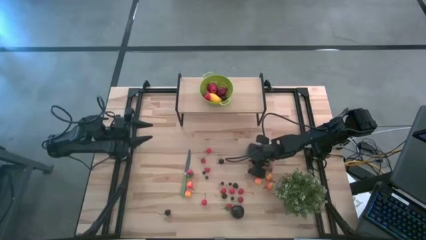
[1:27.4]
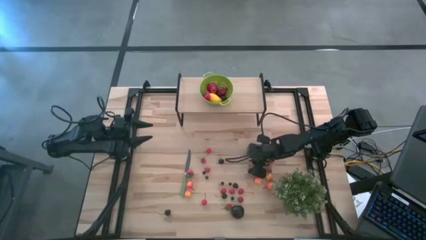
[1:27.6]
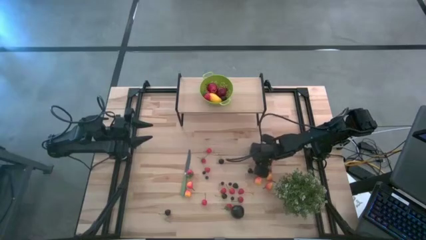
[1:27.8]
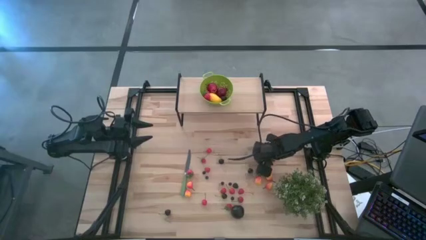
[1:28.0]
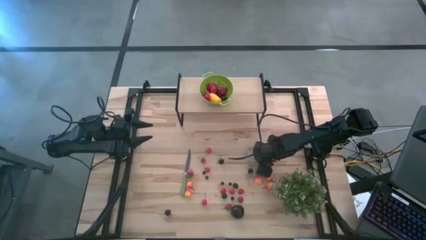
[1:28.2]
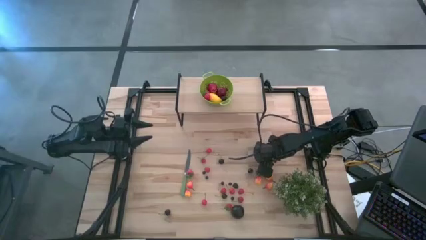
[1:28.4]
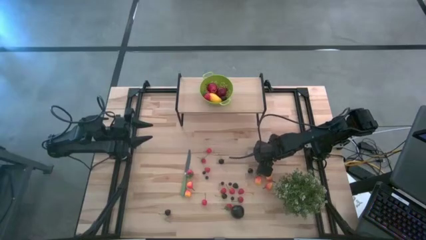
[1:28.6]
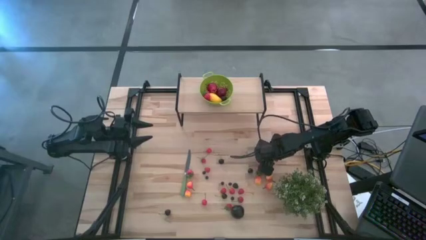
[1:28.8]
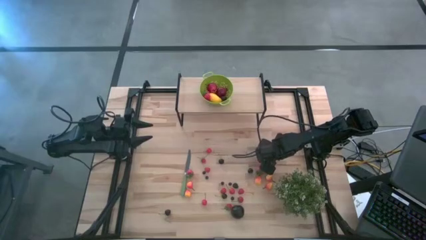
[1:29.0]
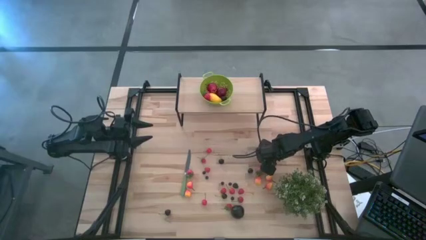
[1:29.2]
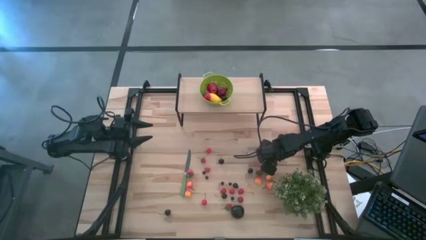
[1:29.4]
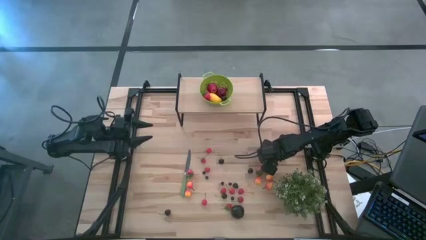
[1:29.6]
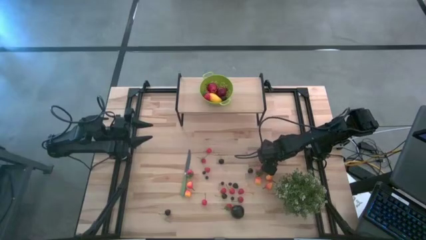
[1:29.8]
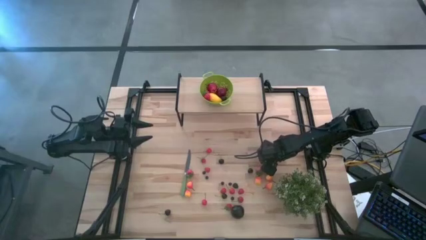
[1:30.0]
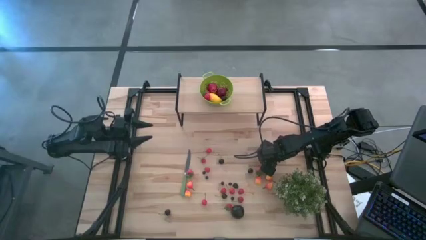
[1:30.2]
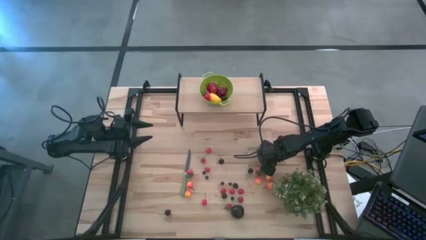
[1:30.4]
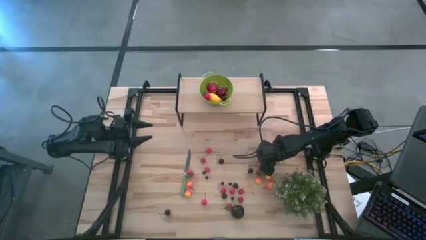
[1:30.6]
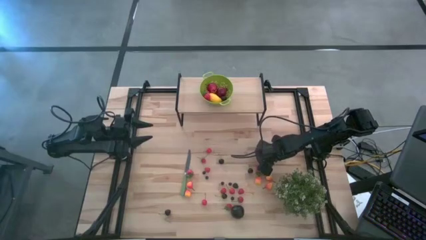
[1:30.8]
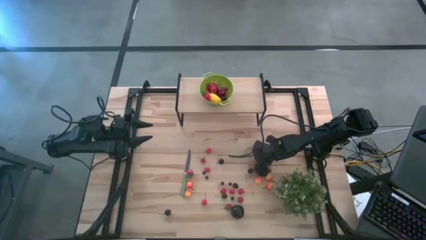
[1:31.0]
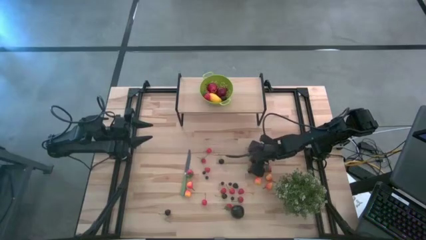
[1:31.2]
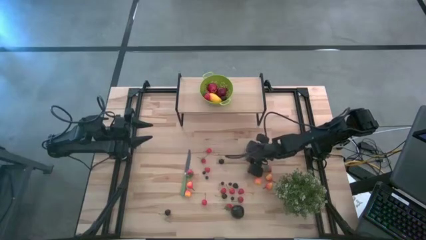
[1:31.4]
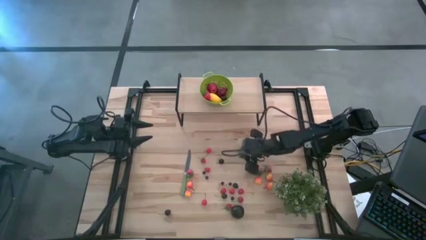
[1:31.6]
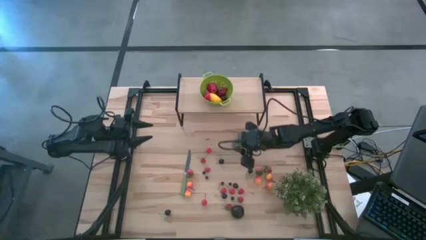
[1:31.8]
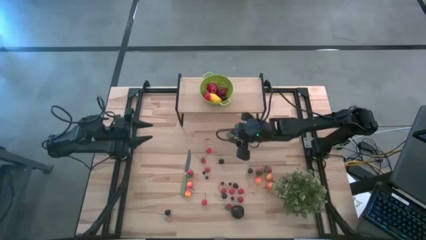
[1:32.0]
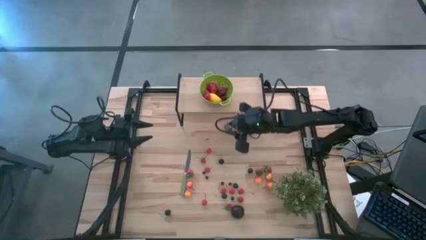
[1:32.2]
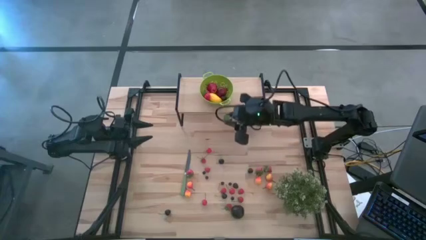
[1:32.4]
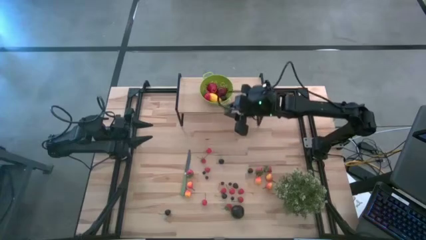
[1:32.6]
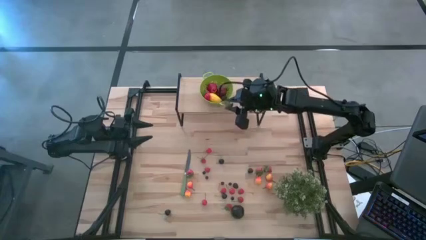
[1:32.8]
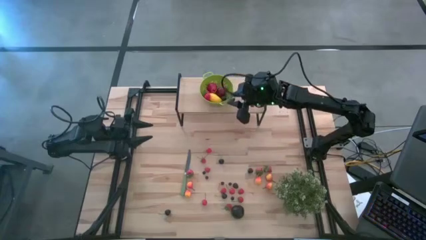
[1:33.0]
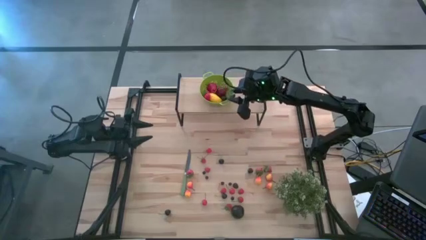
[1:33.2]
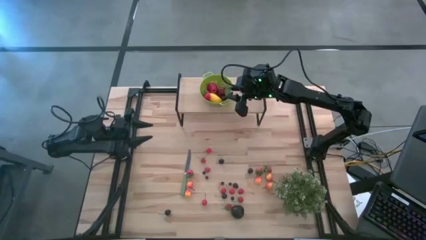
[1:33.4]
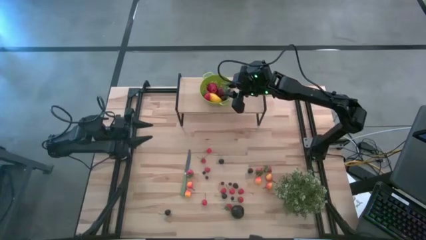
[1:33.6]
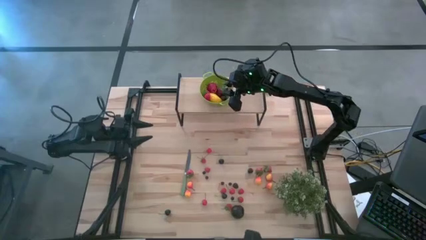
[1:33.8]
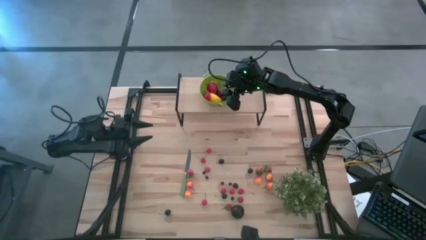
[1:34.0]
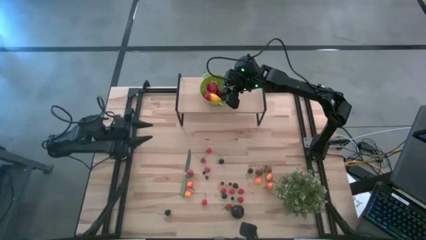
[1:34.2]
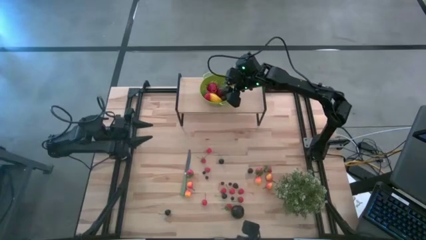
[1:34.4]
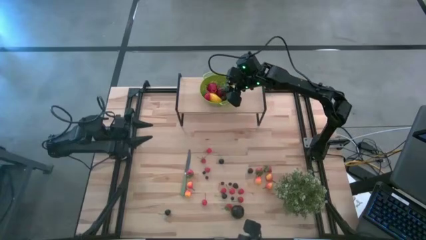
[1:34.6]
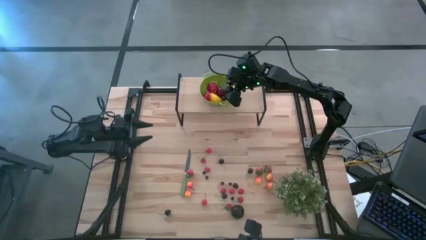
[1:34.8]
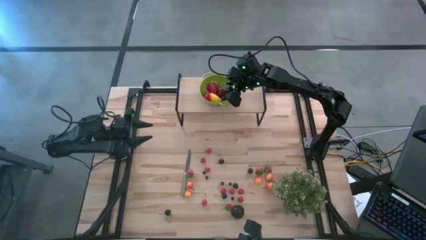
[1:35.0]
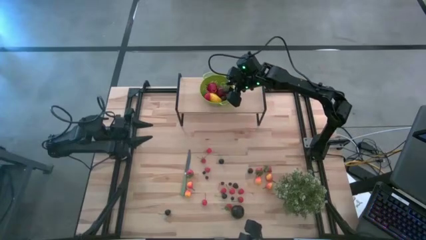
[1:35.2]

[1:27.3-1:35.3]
Task: Pick & Place Fruit
Put the strawberry into the green colander on the shelf

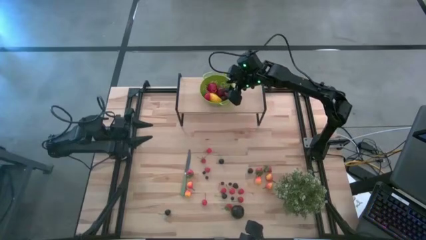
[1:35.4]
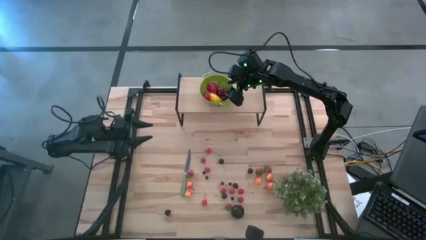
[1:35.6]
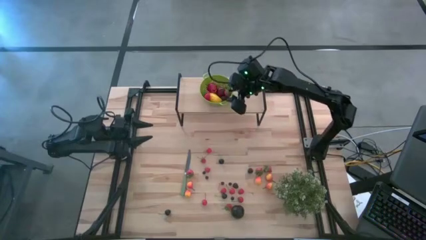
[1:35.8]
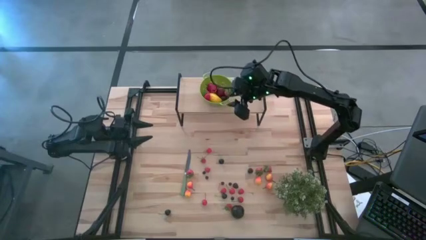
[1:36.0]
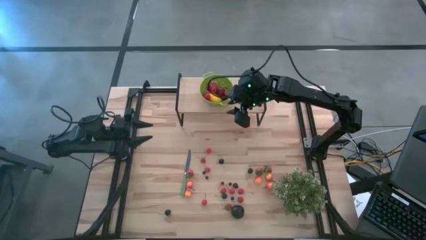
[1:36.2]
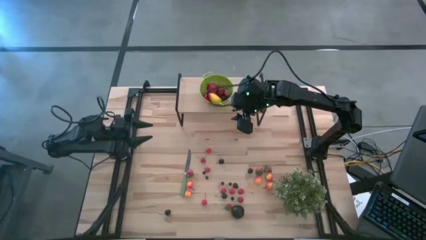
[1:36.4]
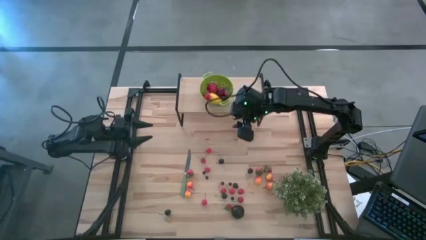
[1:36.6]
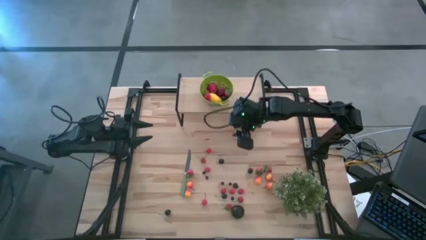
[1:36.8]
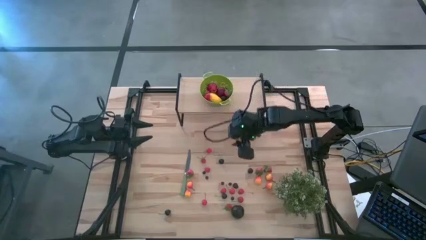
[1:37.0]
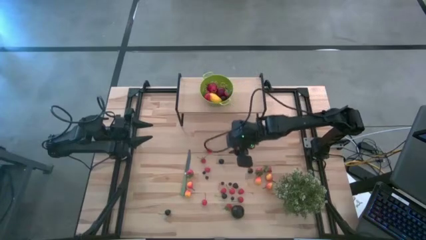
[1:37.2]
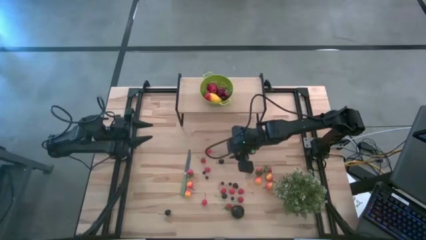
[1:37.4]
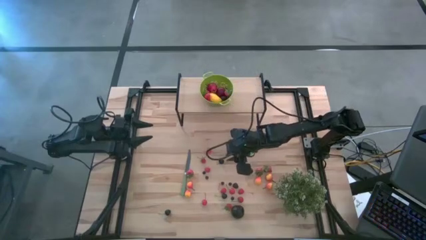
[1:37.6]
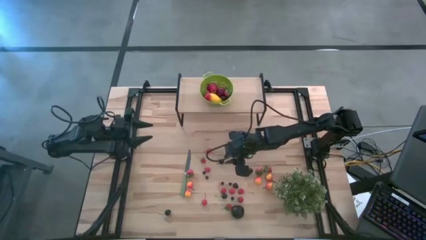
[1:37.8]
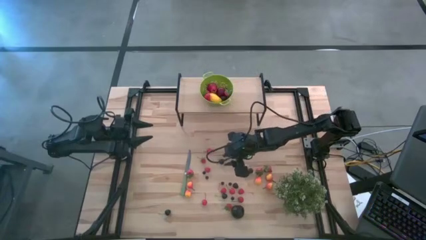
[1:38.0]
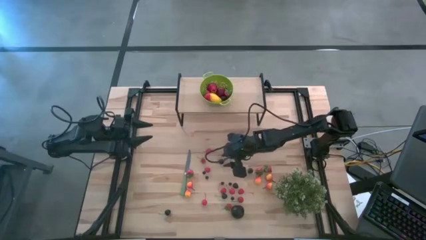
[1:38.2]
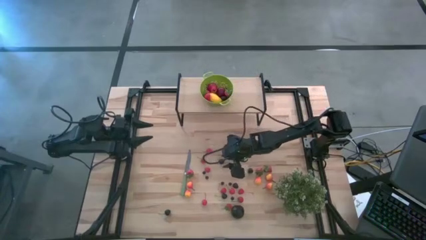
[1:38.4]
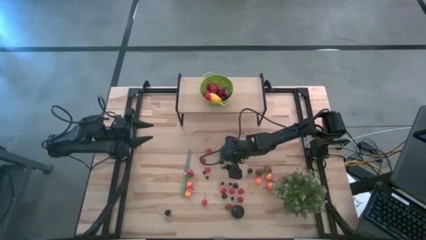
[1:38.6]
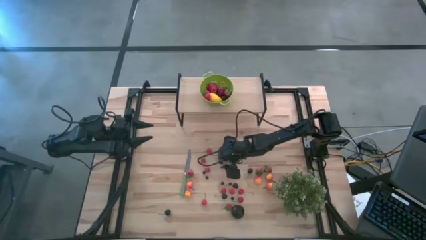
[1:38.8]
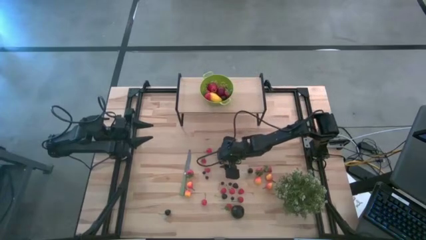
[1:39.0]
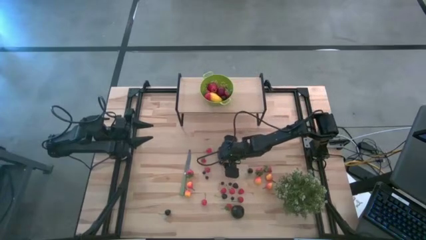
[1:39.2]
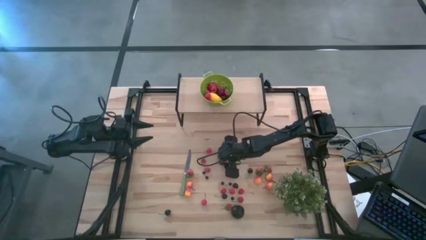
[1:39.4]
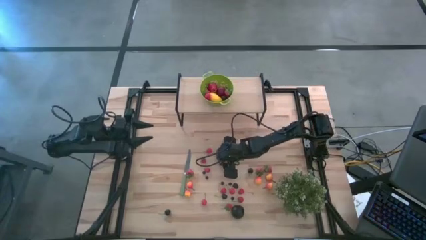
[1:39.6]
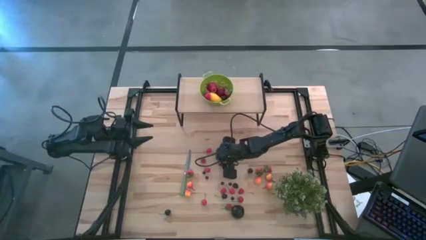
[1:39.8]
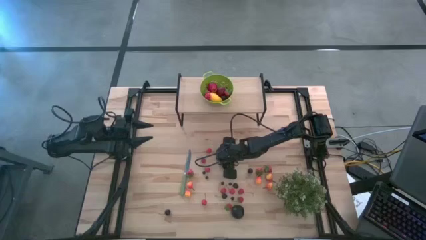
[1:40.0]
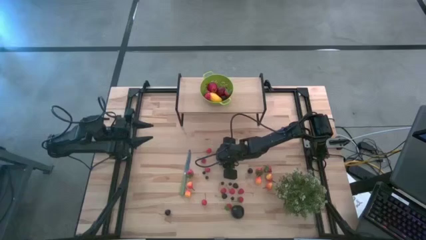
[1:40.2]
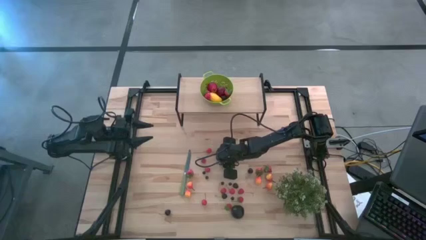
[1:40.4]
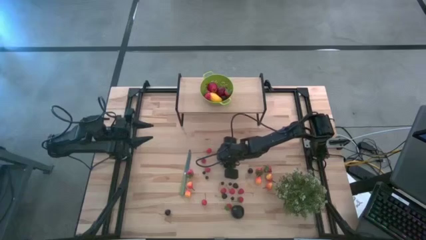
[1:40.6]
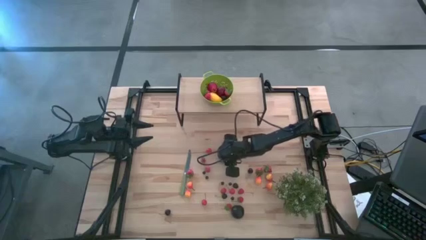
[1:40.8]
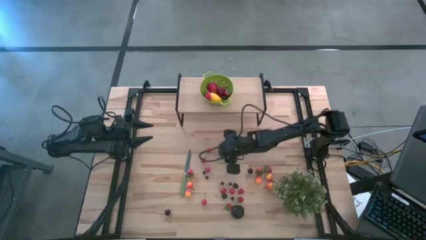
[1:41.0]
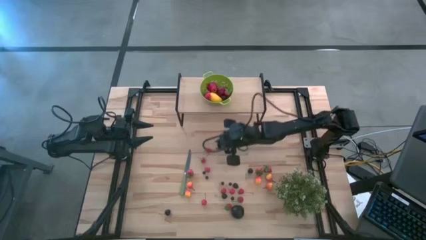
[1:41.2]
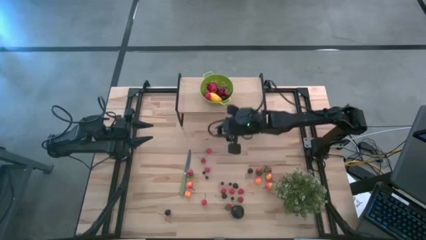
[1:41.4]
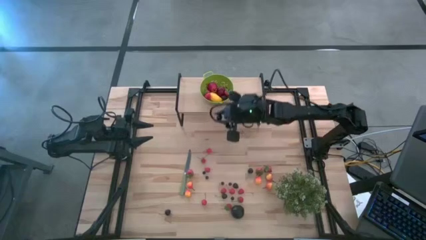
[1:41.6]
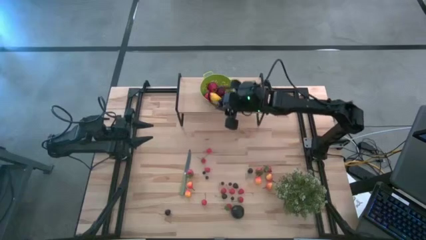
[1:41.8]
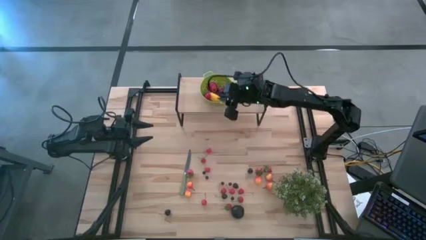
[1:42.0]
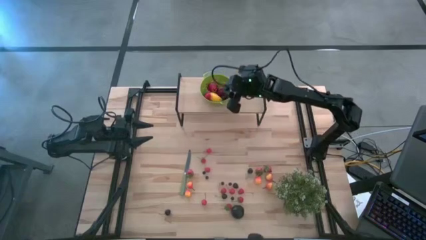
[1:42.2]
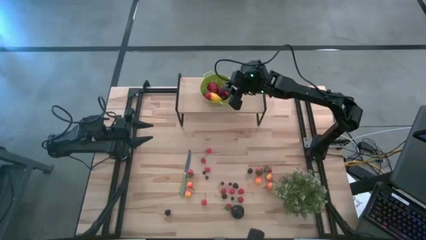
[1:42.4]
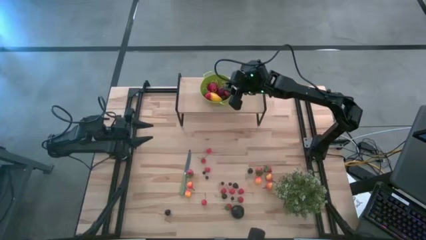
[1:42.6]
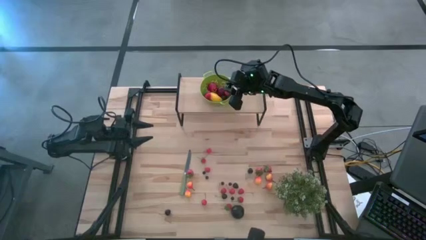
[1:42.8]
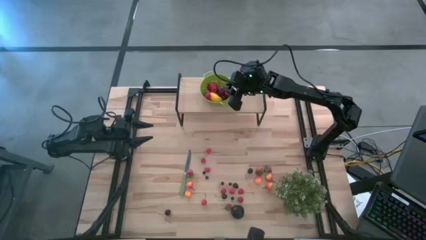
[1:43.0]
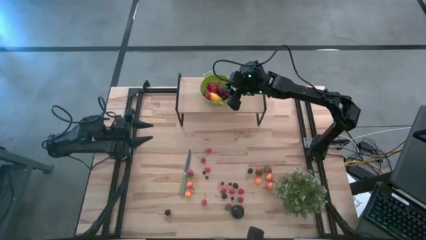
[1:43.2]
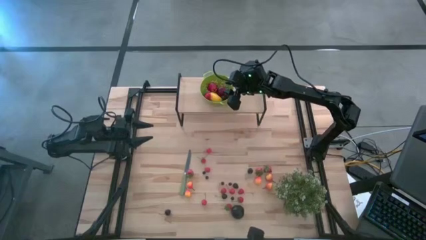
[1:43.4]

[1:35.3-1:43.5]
Put the black cherry into the green colander on the shelf
